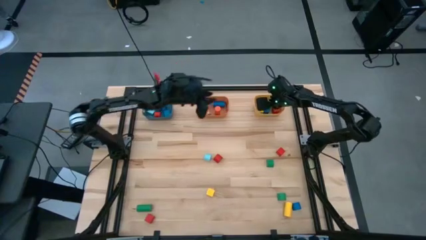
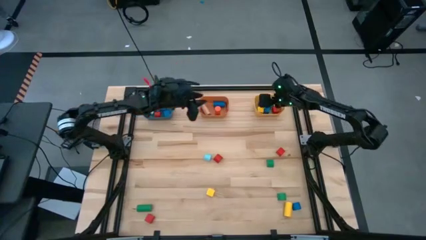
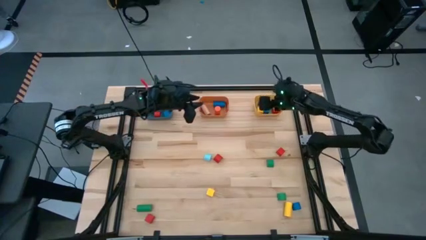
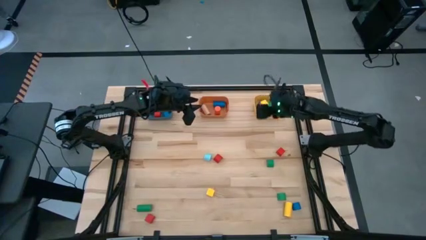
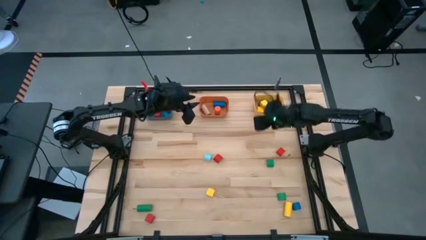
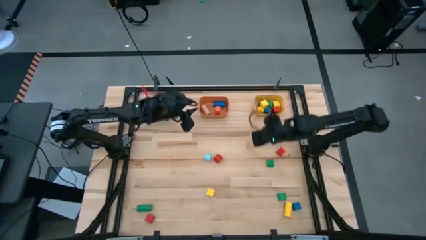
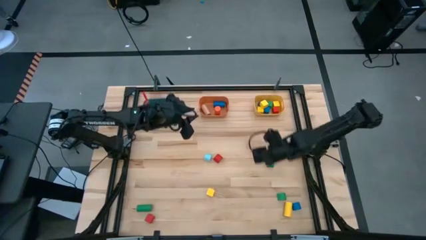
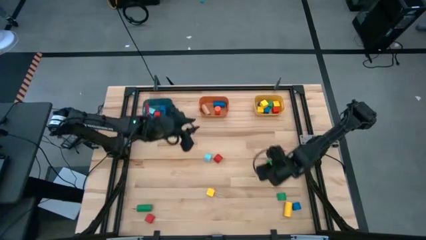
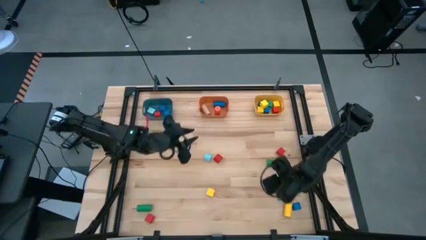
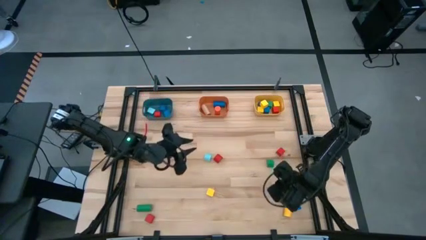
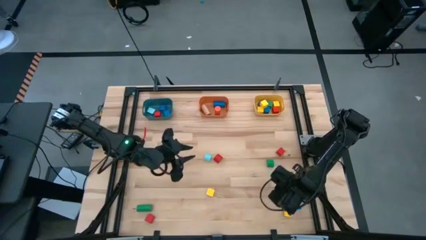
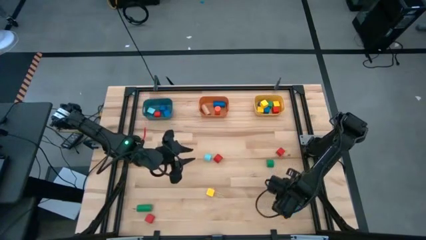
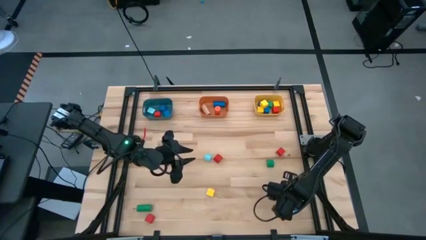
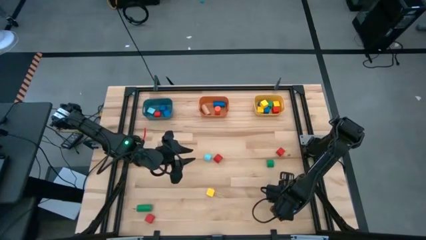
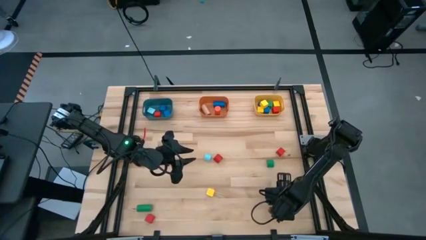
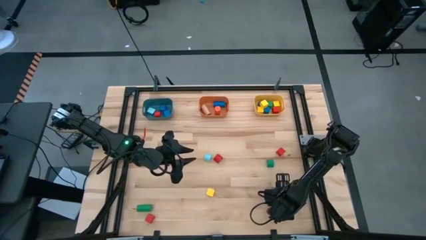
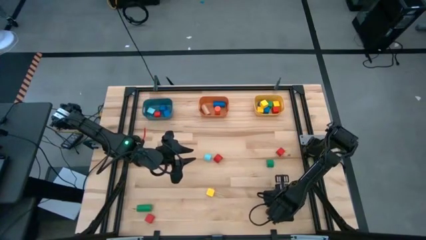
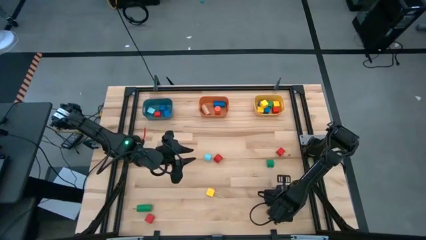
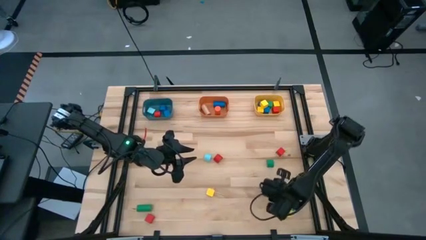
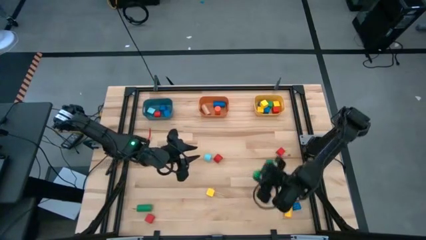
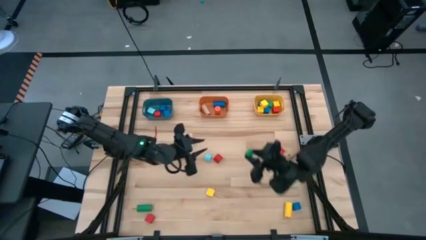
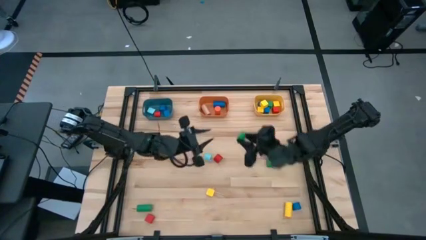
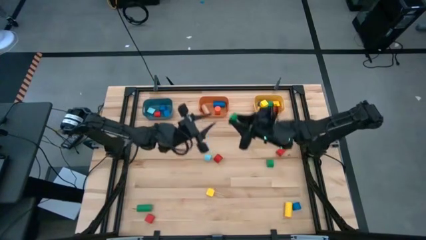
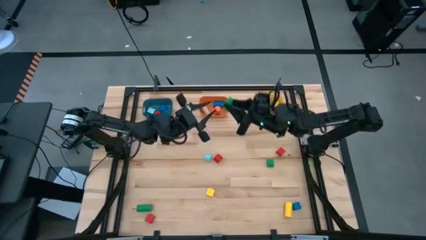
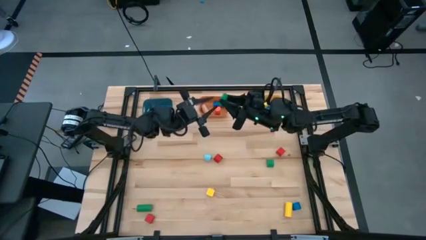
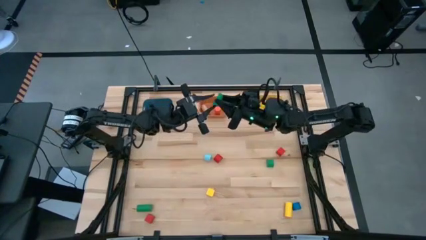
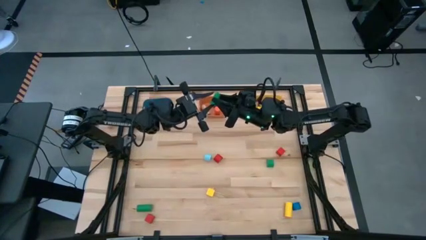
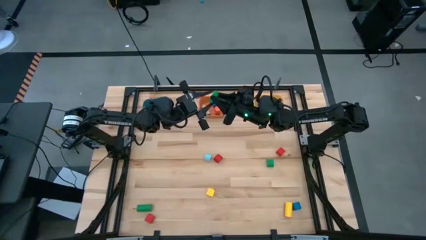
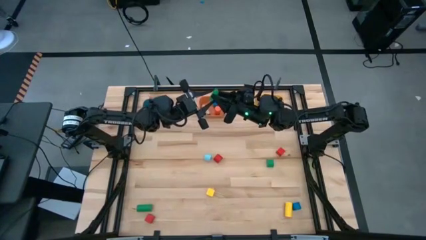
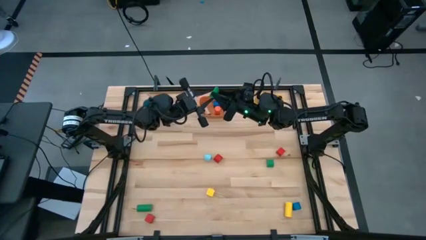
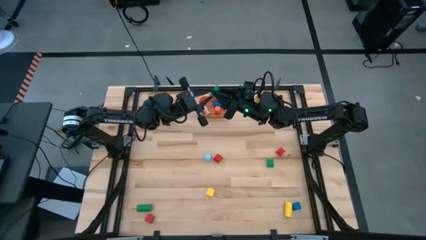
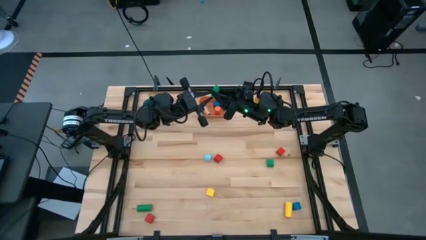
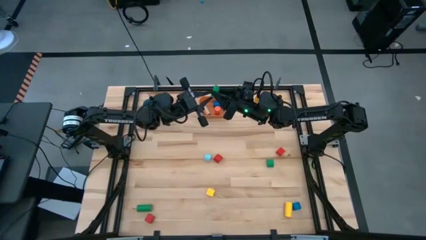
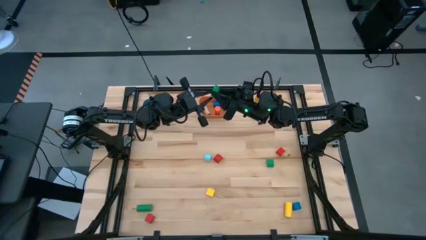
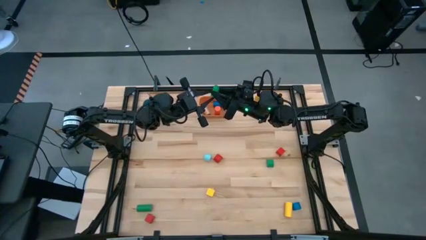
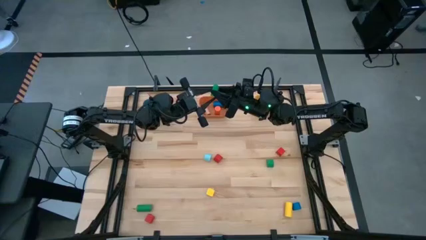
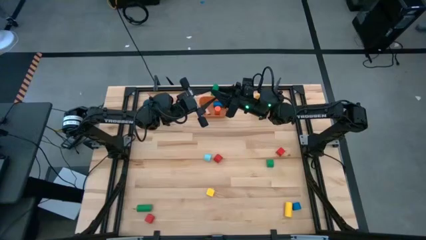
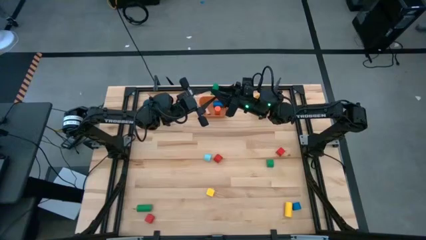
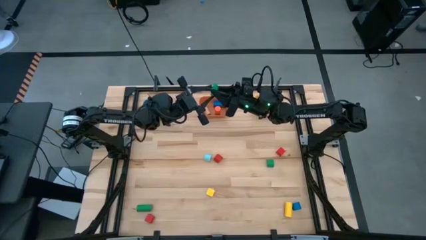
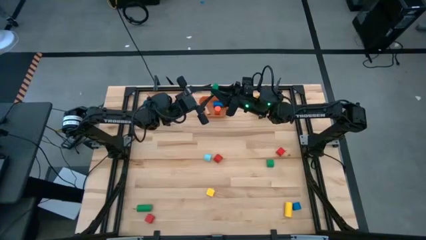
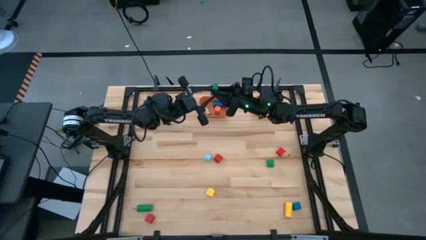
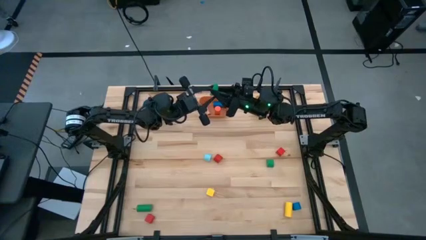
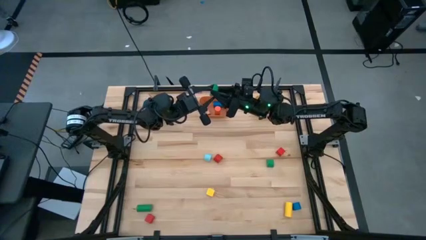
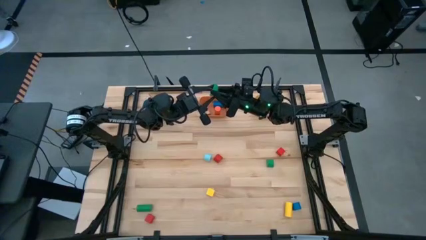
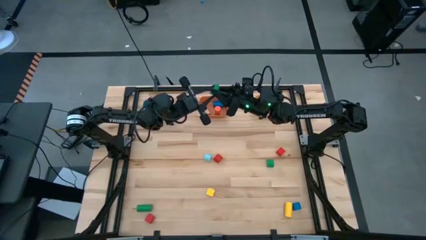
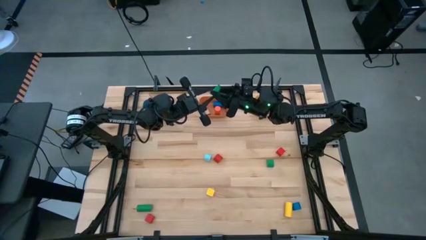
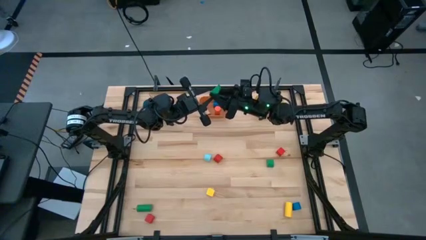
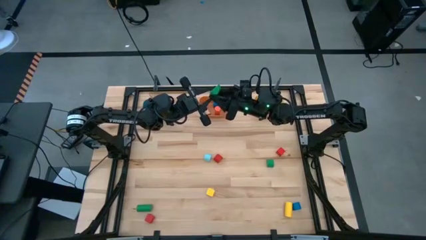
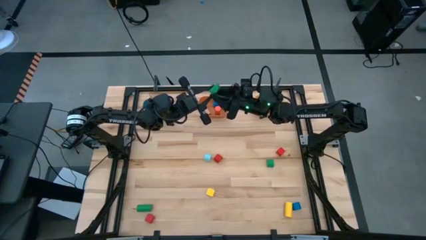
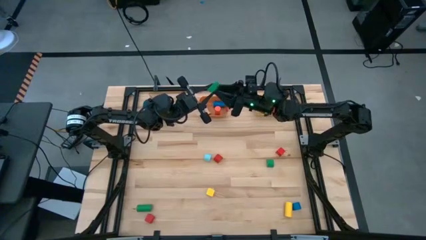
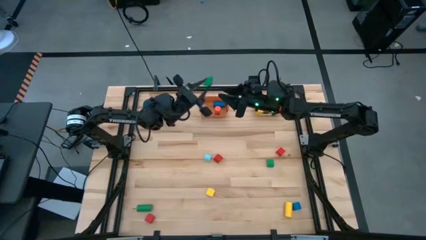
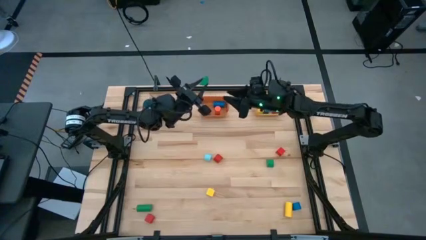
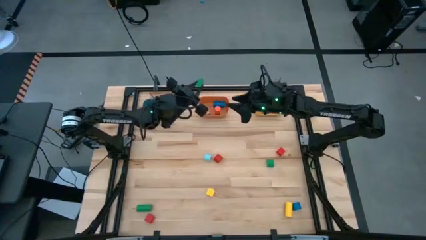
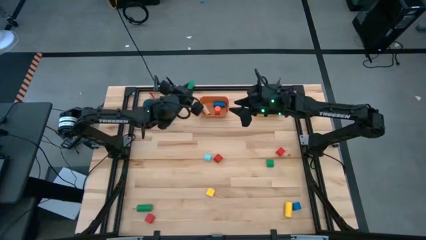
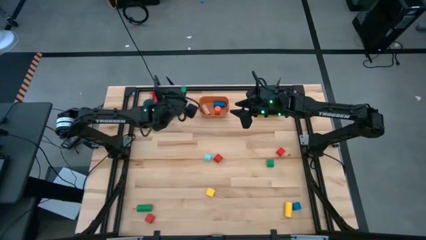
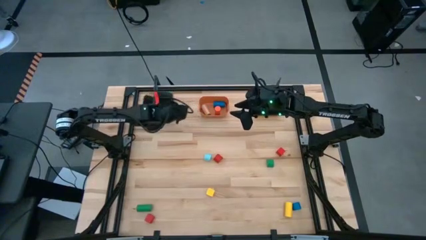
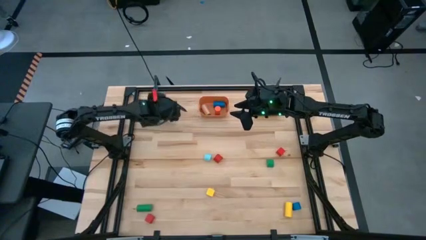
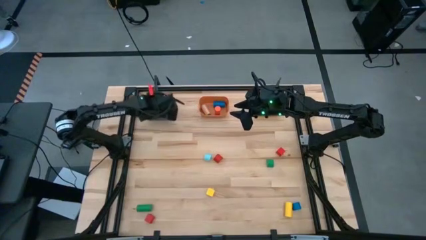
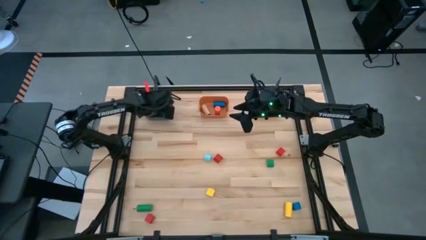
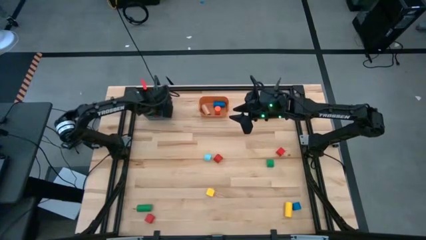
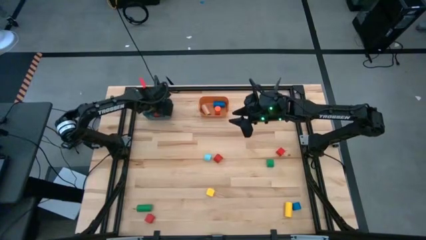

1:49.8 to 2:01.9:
Task: Sort blocks by size
Put the green half-circle block into the blue bin

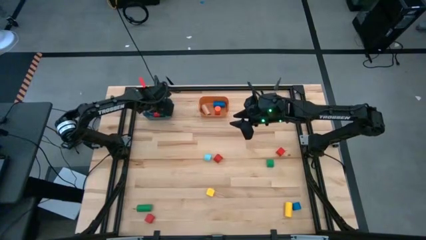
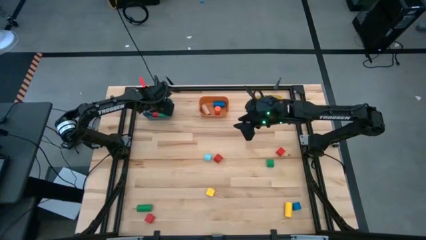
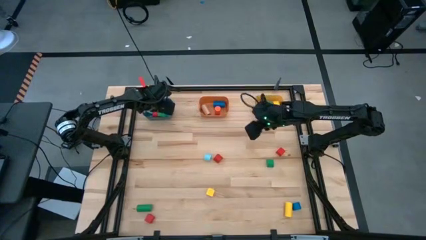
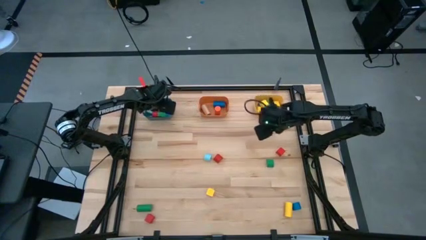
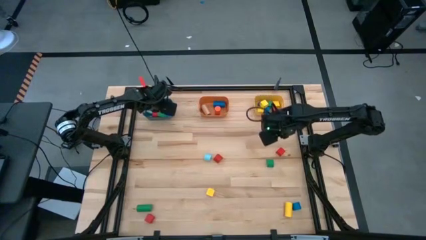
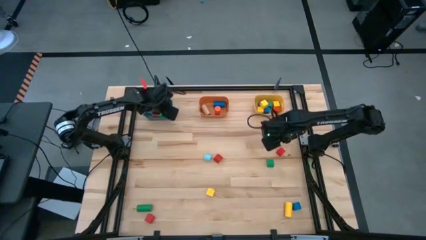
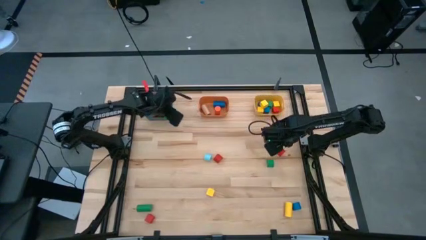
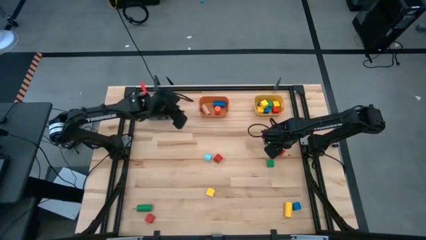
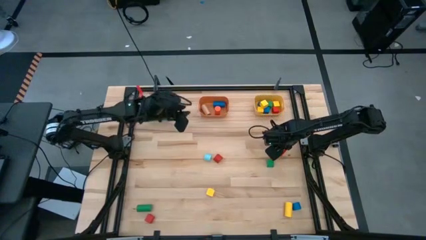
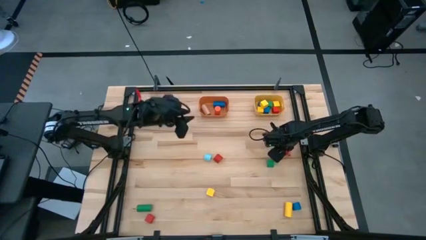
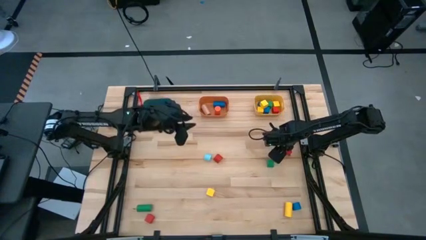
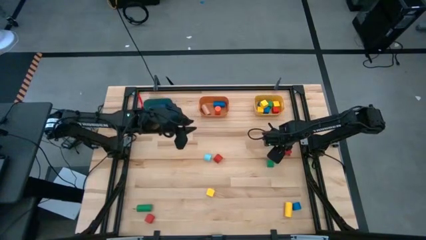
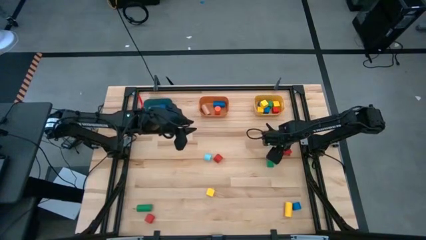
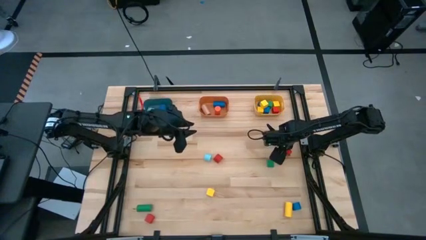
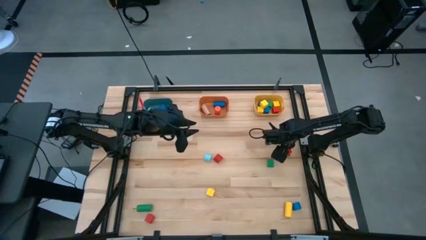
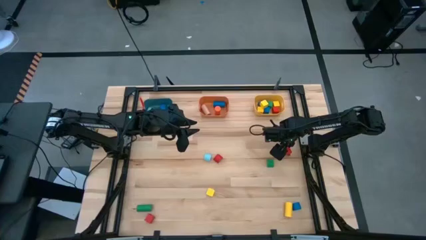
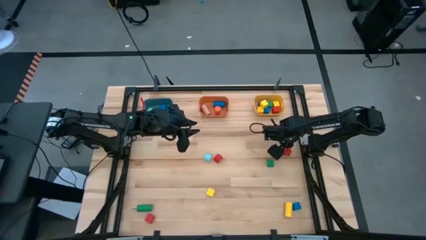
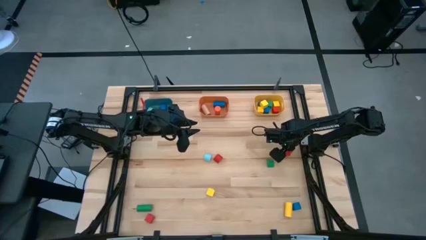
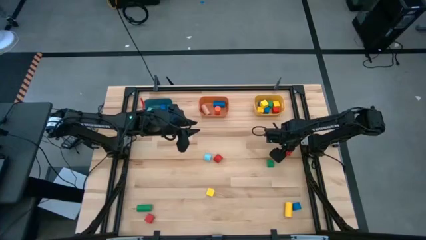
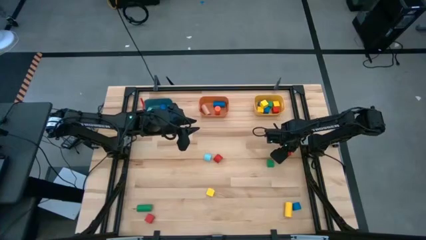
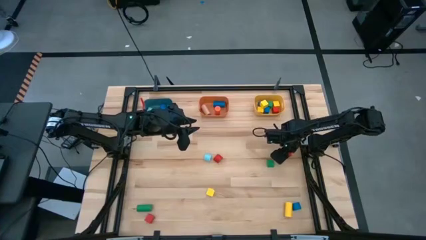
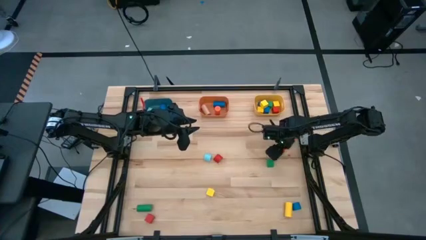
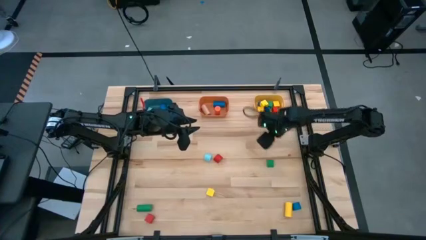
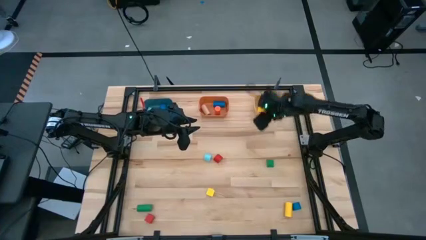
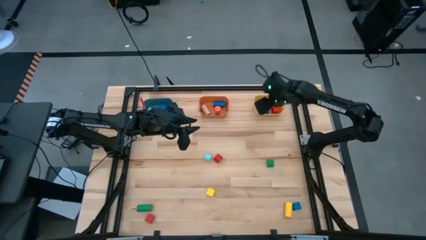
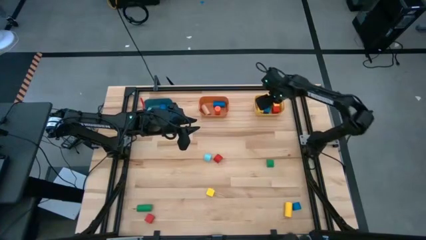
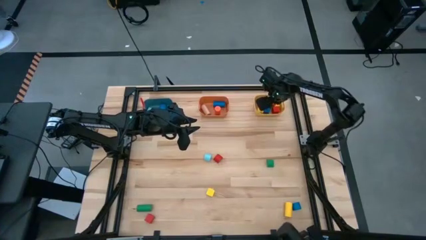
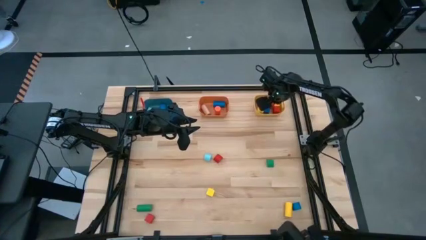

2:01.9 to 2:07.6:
Put the red cube block into the yellow bin

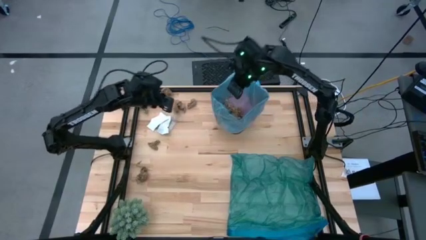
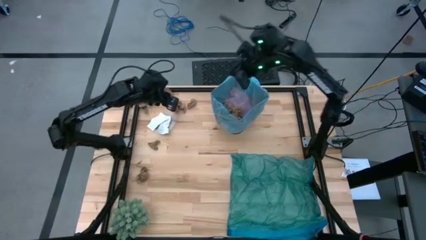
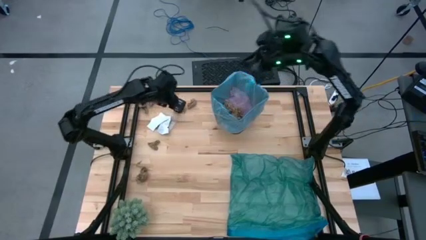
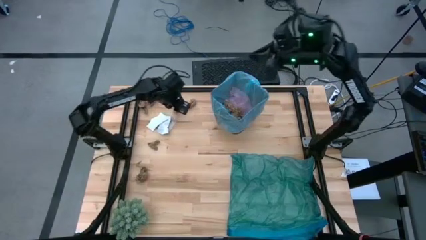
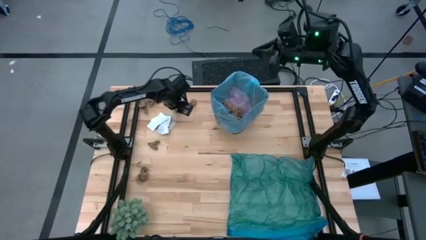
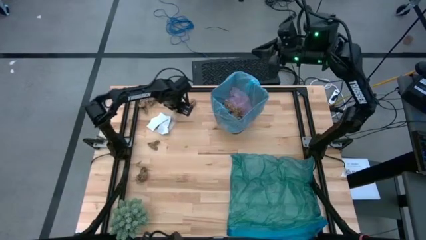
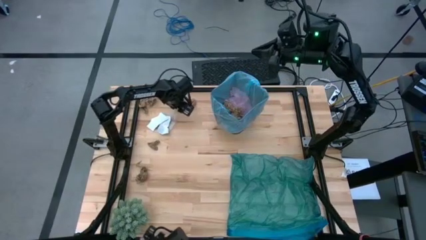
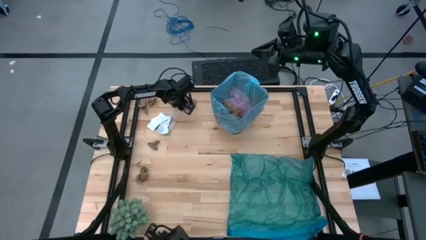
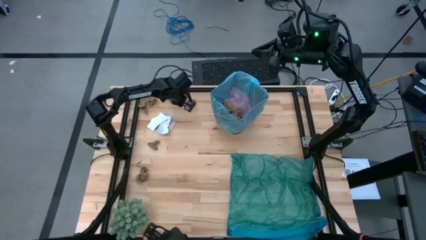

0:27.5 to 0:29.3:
Task: place trash/remove bag and relplace
Put the brown napkin into the black trash bin
